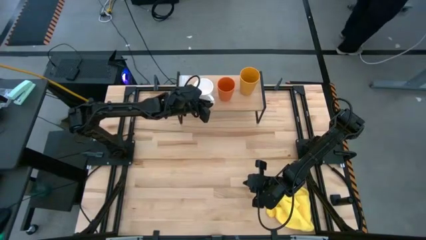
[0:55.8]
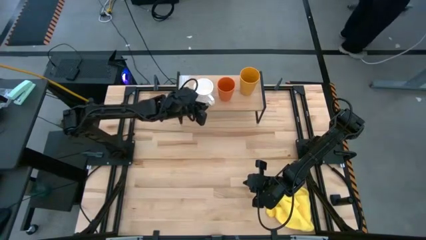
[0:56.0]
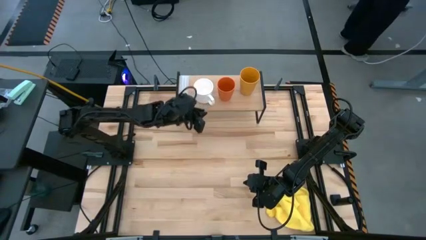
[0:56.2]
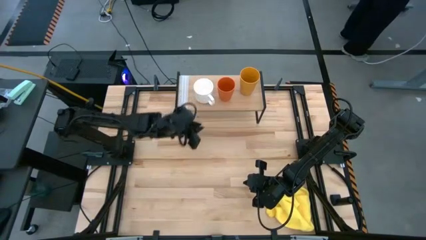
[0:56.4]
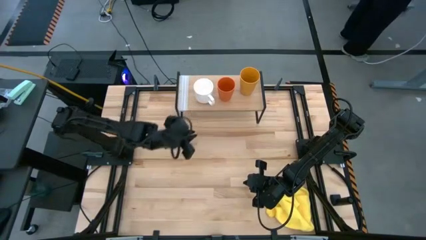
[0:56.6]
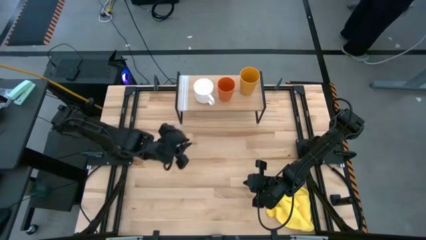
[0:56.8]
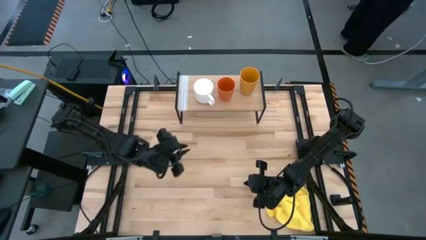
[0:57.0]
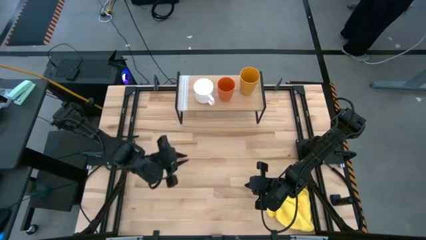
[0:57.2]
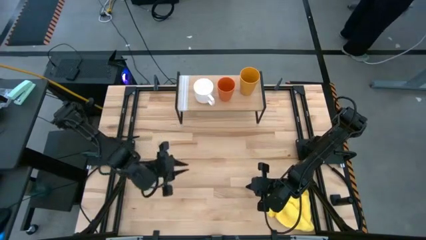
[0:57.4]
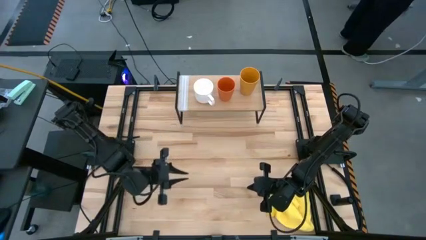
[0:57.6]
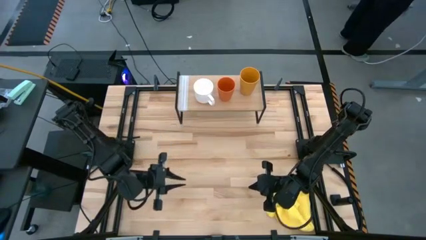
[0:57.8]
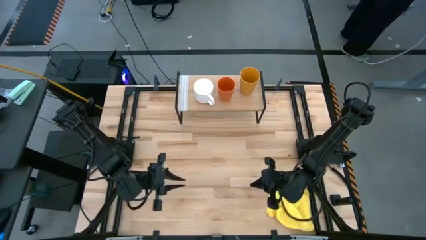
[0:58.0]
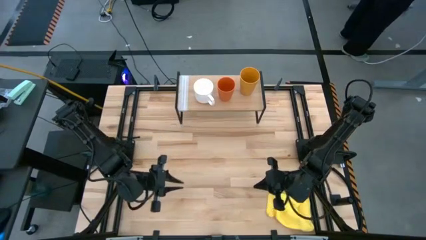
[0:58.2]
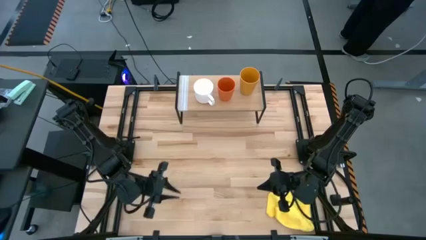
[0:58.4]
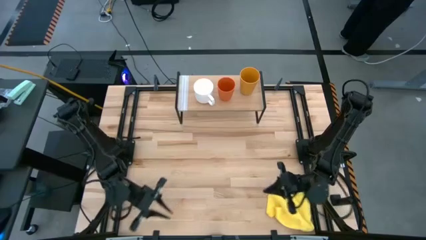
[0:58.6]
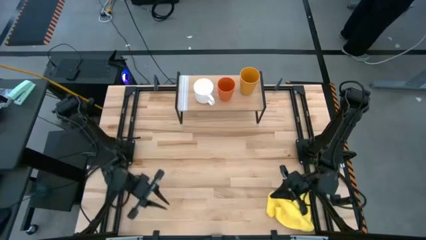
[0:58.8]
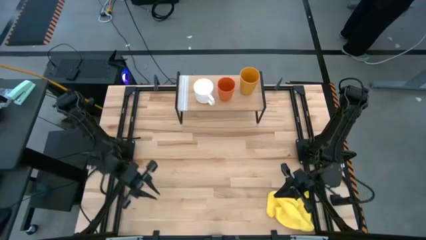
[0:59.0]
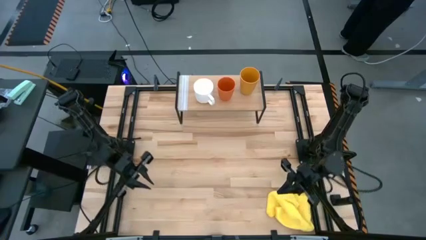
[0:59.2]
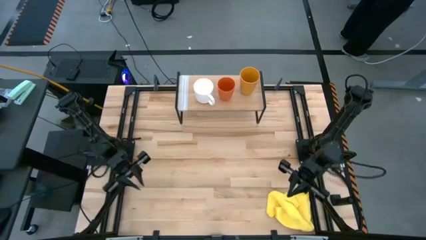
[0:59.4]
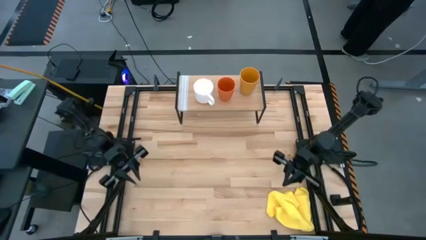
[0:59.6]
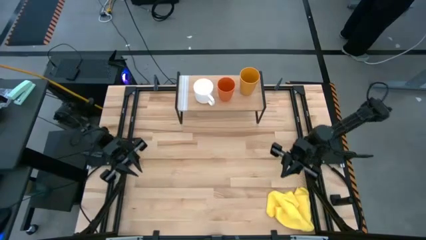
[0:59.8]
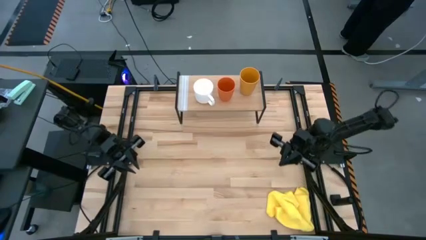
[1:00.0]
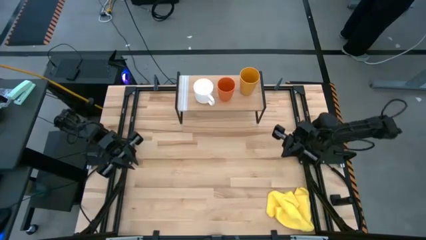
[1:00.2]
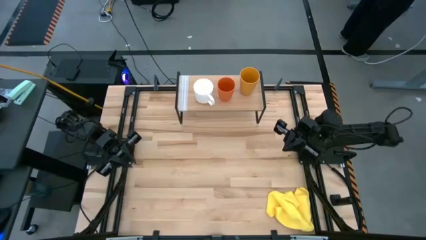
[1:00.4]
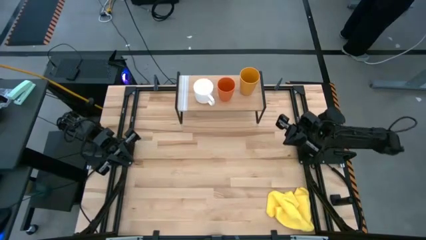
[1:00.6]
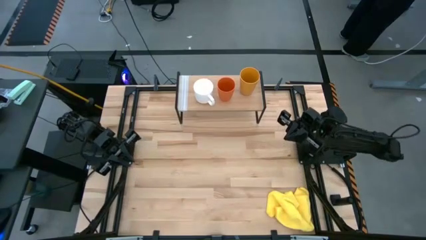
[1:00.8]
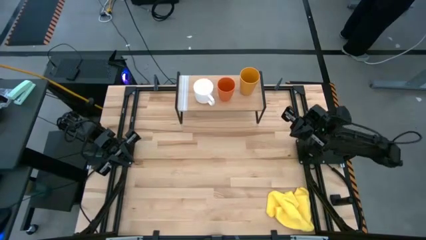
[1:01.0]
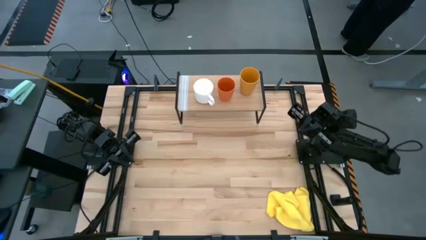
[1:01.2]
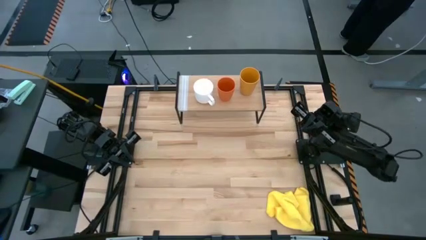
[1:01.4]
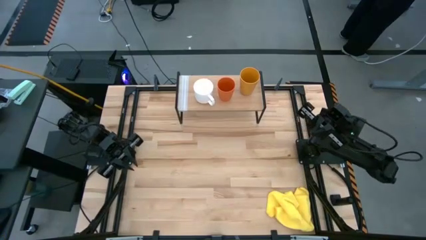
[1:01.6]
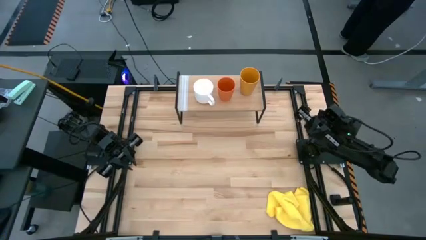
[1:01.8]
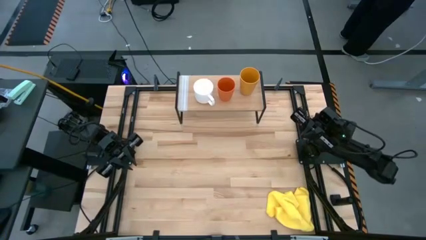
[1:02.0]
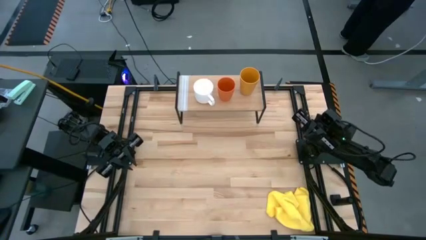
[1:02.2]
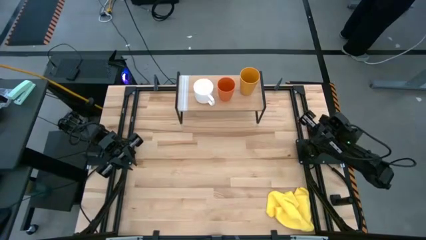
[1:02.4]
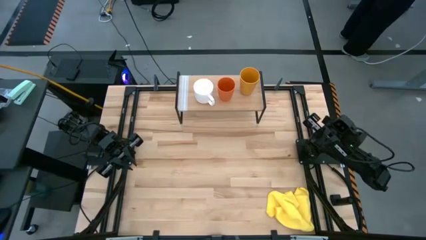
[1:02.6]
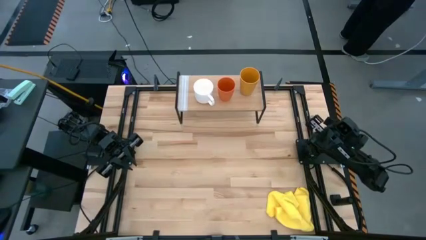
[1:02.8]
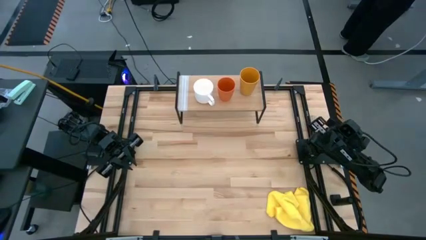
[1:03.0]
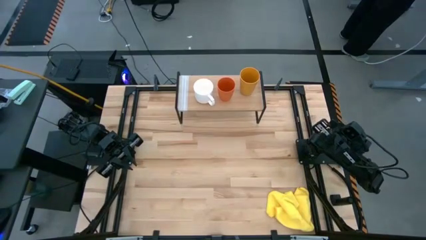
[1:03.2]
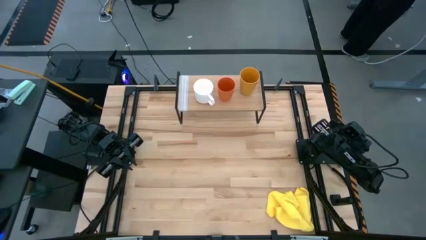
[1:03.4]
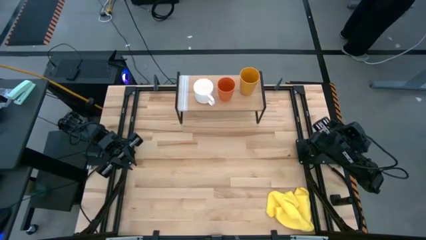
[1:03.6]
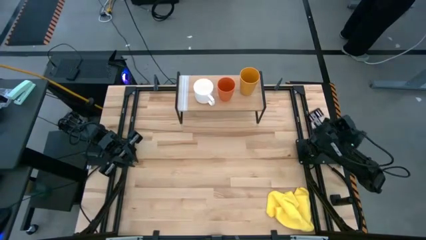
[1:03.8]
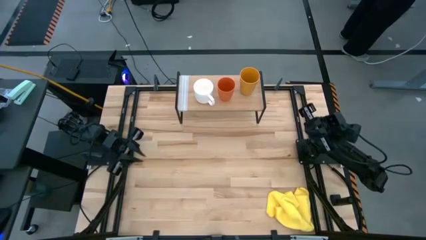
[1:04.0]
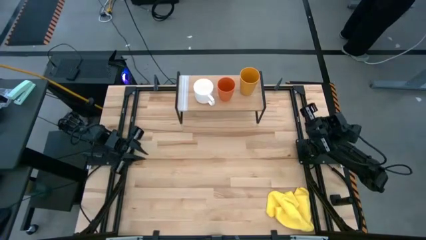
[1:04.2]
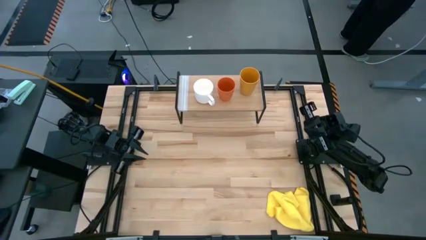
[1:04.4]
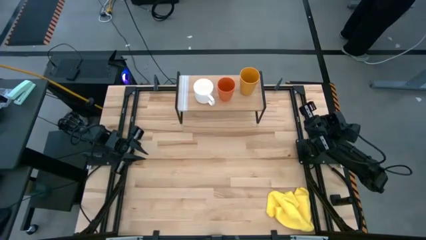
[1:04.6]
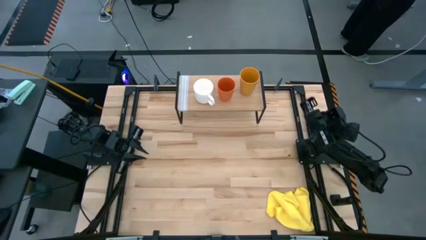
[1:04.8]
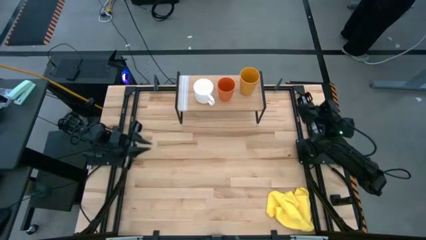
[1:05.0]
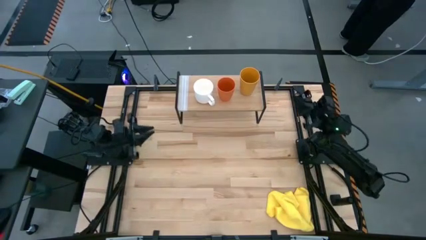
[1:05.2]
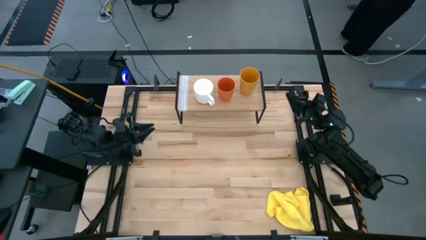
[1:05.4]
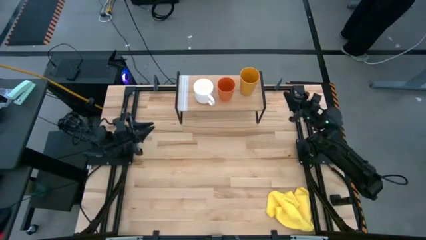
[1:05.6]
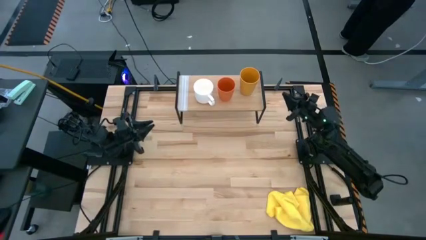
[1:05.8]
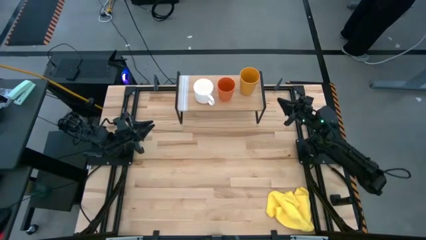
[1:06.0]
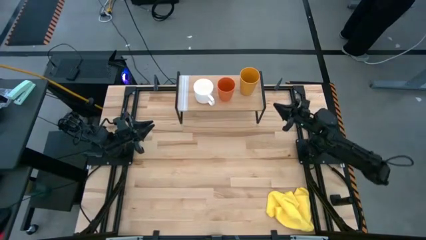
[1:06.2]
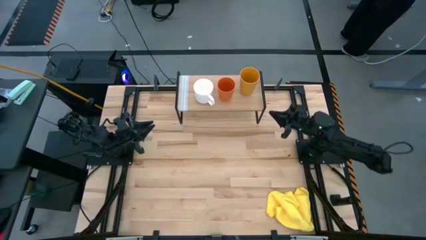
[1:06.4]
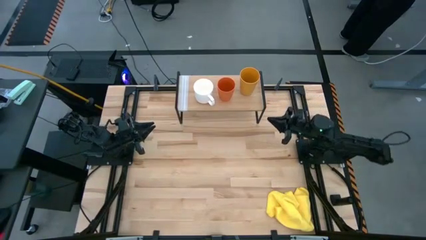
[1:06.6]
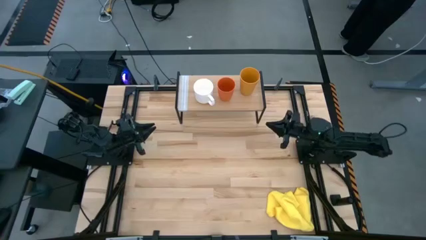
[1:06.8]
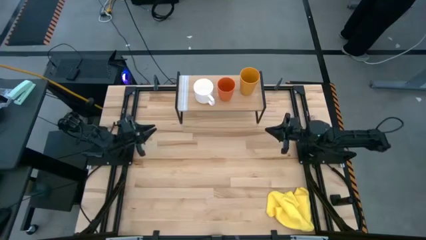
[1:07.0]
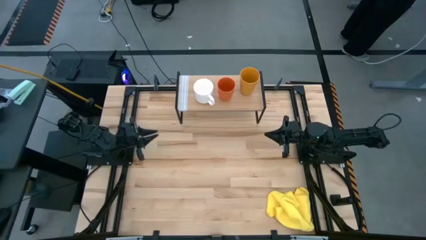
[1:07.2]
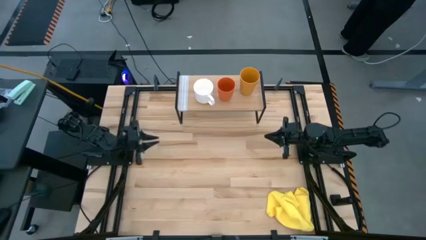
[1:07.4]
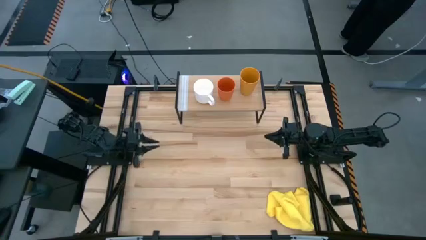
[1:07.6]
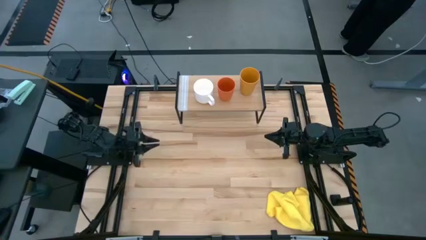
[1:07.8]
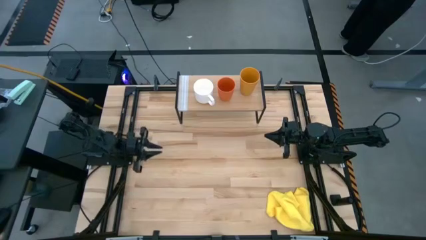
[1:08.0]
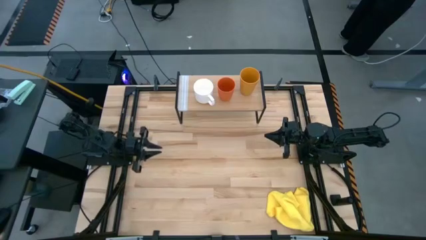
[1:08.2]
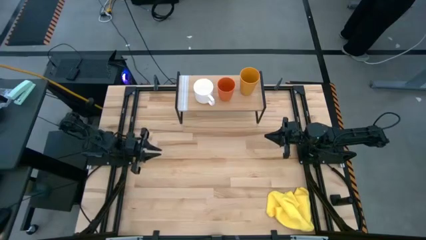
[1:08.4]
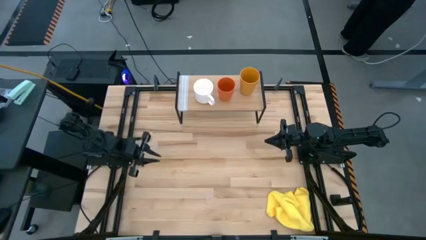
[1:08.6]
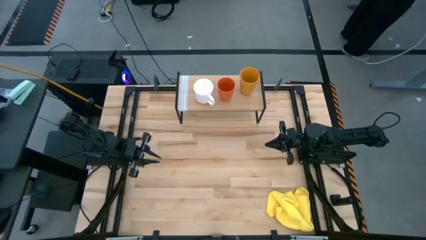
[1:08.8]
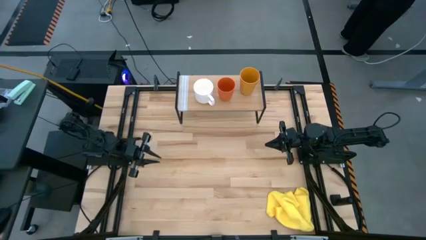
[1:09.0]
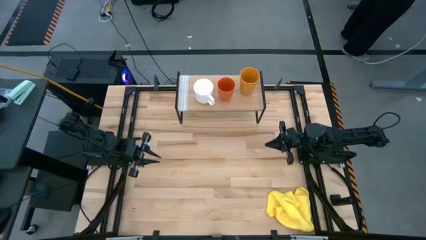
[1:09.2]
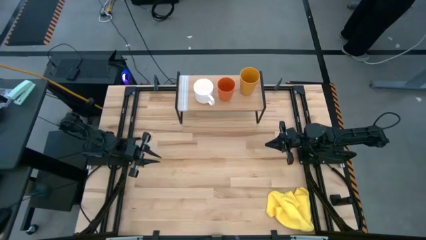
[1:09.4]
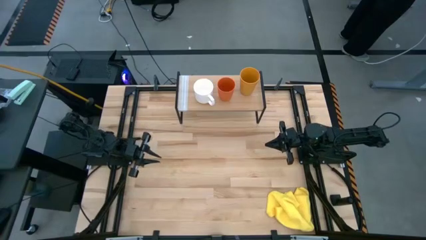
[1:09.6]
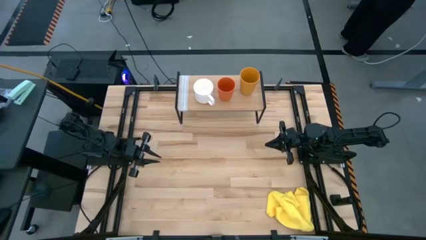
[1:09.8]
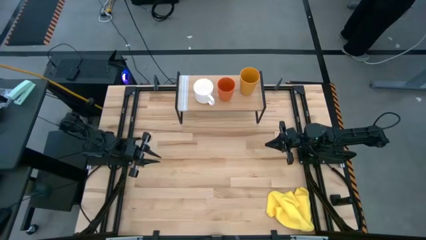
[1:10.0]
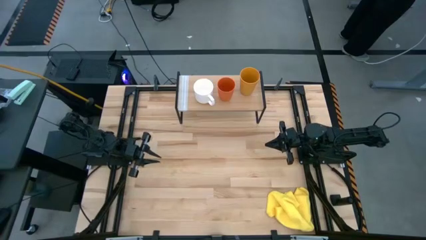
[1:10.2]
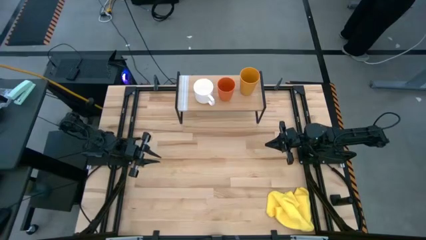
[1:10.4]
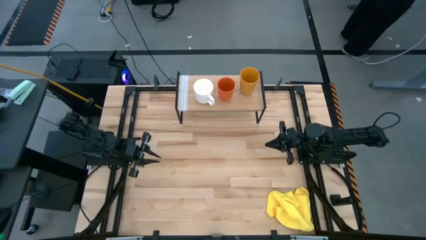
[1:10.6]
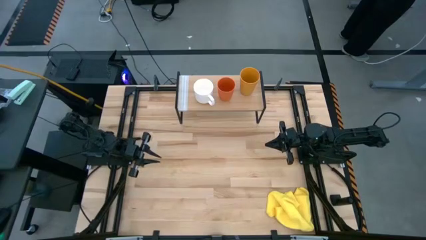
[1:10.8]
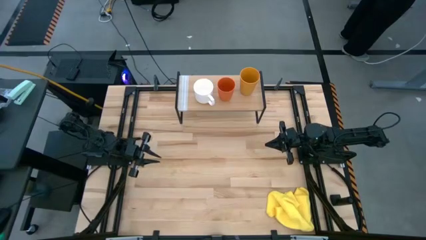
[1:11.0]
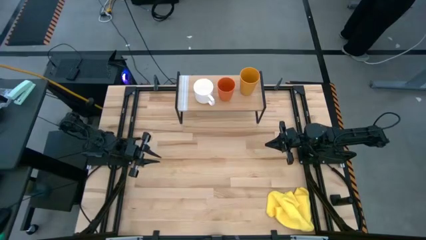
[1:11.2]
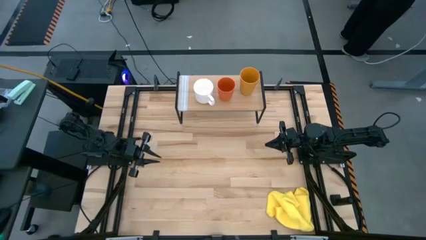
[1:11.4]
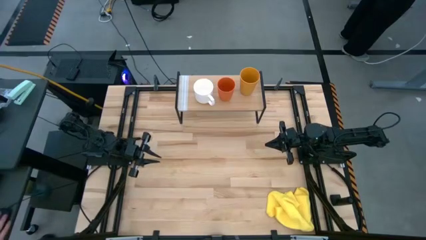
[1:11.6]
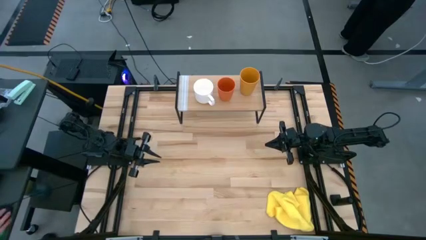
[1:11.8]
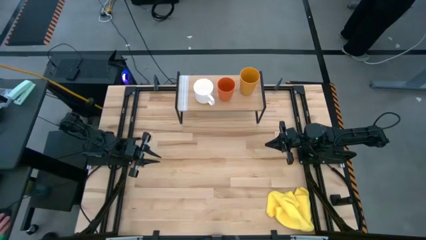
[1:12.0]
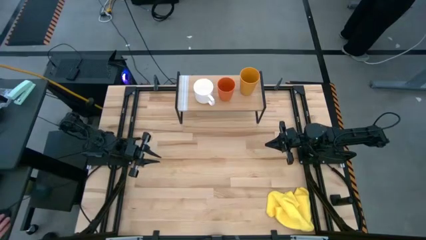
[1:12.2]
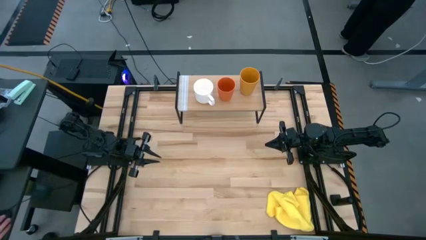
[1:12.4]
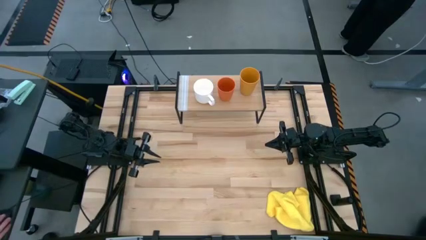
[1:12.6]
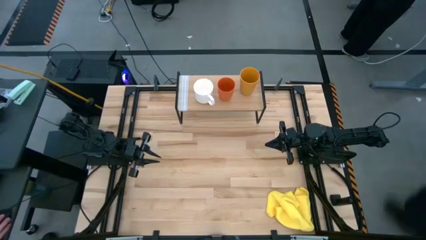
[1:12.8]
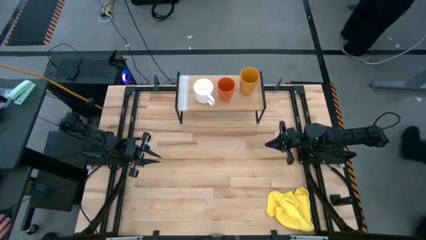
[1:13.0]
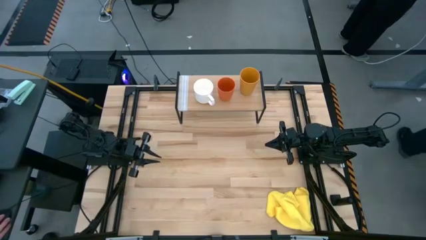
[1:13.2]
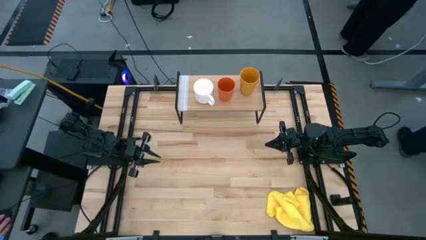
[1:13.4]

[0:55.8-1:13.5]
Task: Stack small to large cups/mugs on shelf
Return to Home Position
